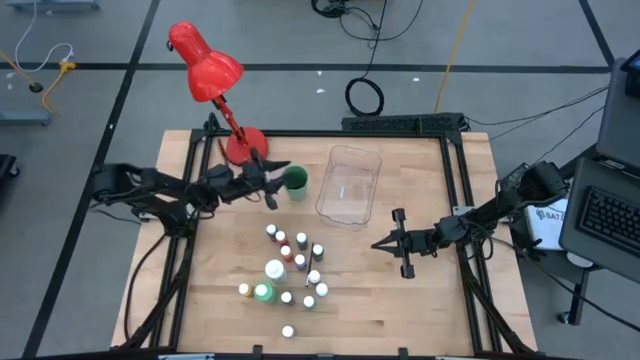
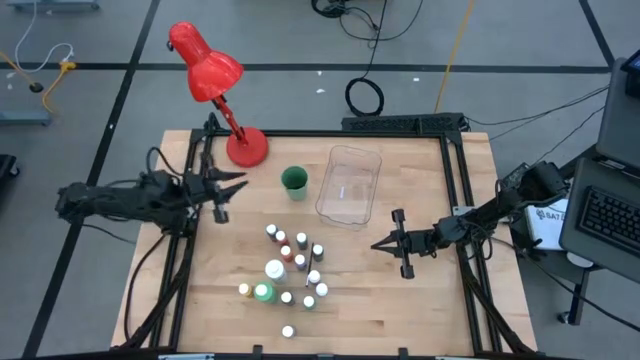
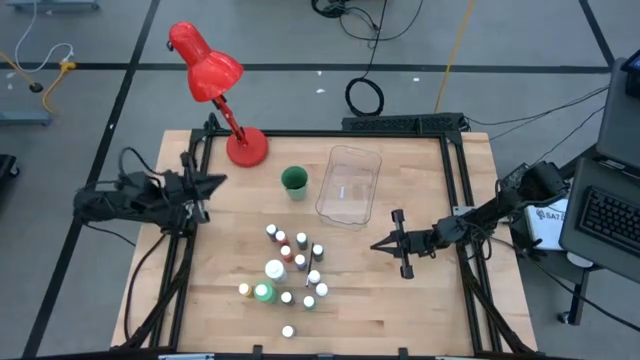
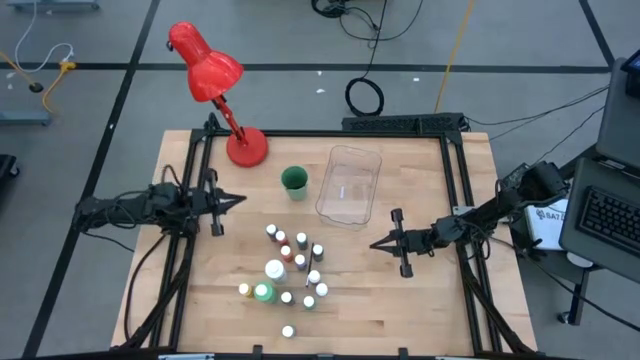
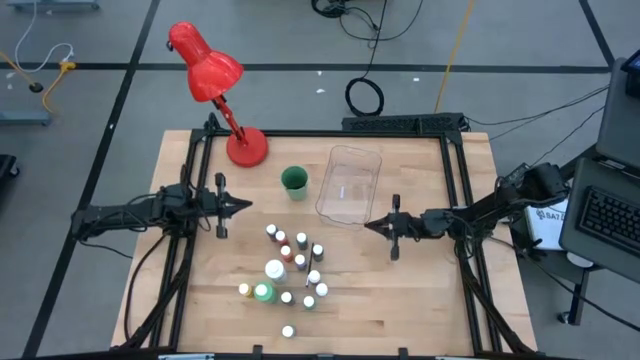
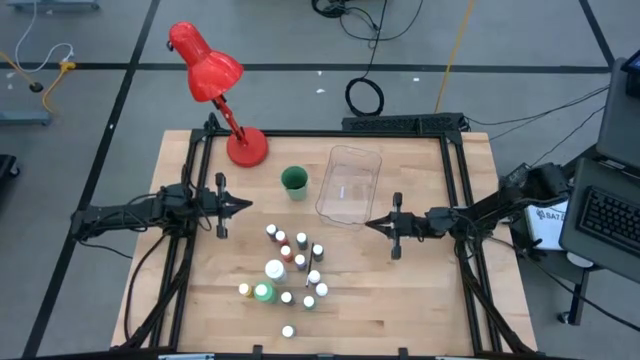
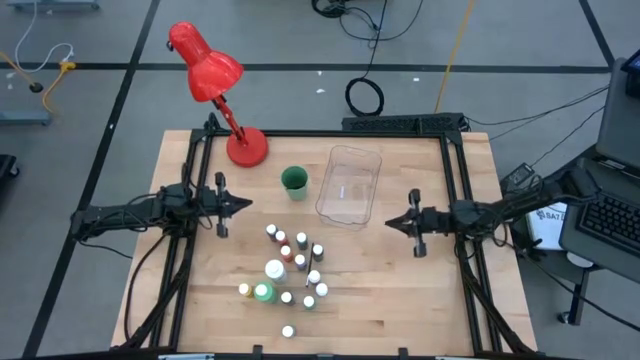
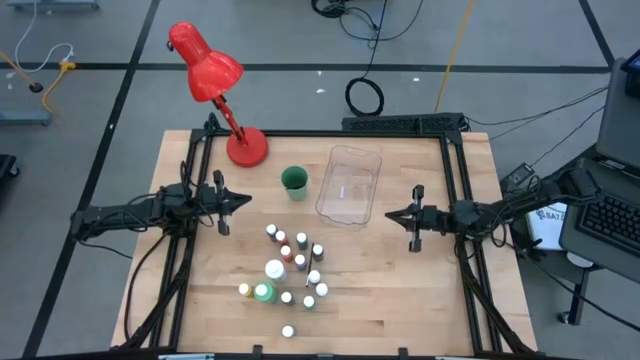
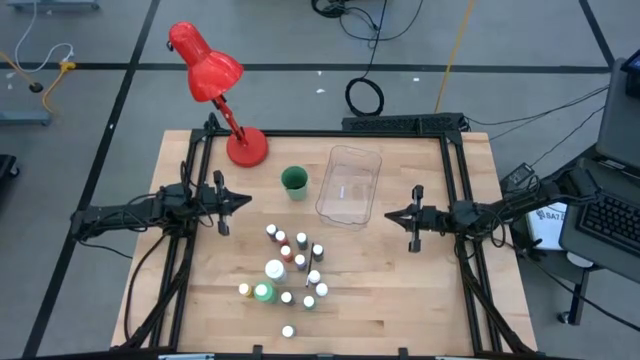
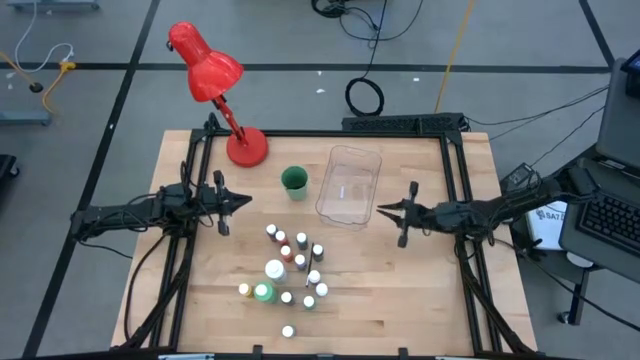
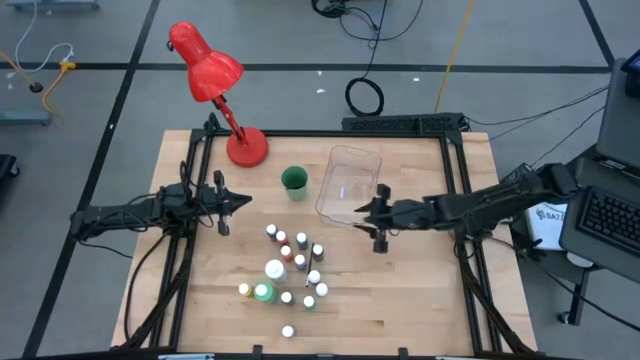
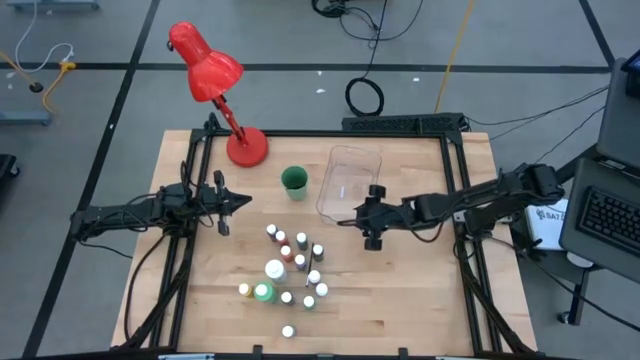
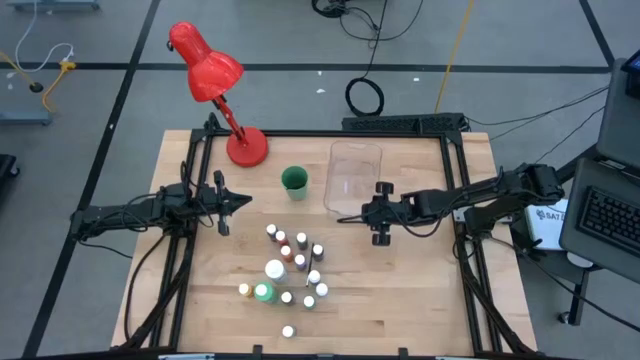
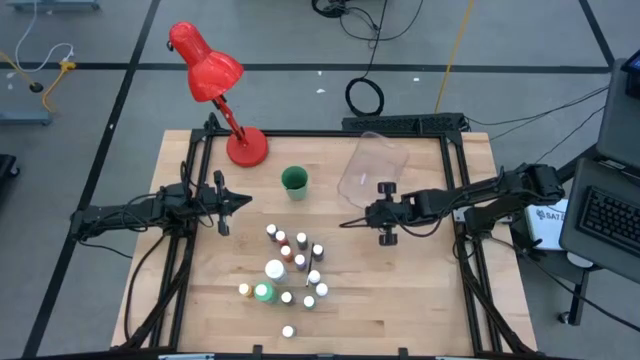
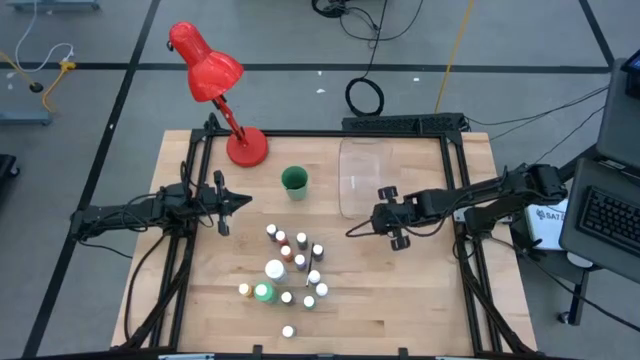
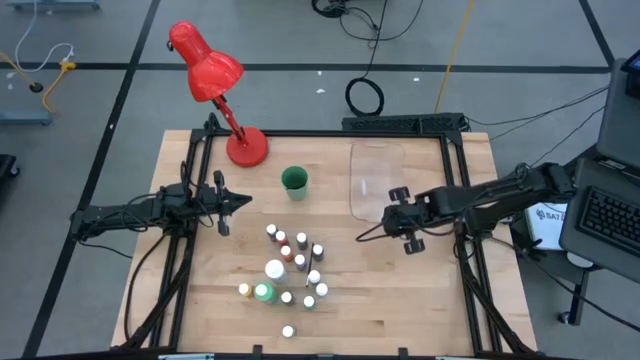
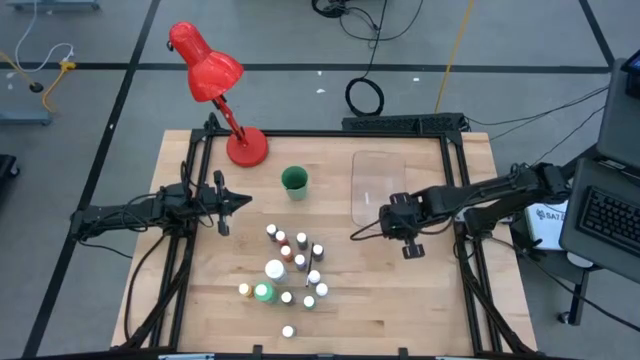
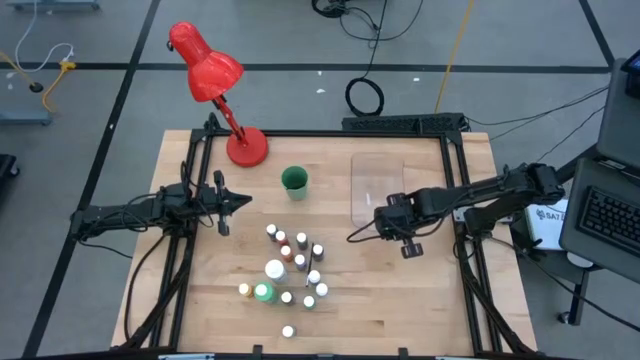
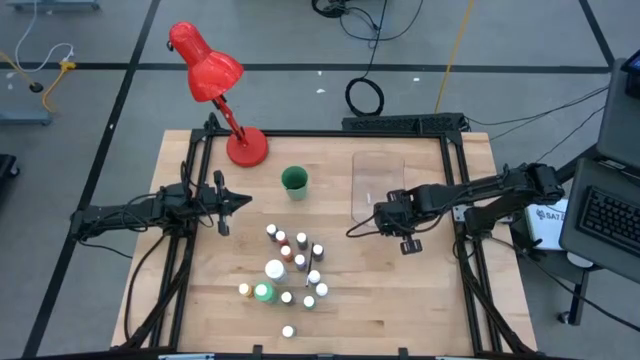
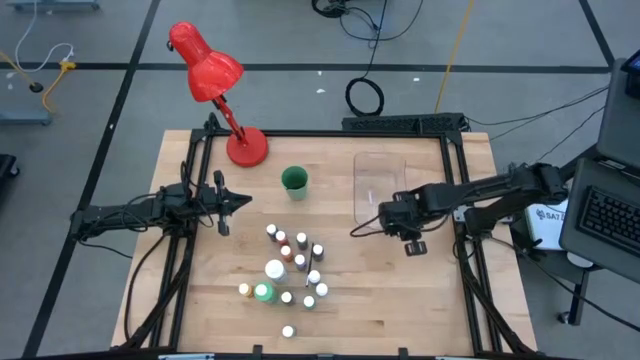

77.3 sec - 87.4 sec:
Task: Pick & Place Paint Supplies
Move the transparent bin to the top right of the table

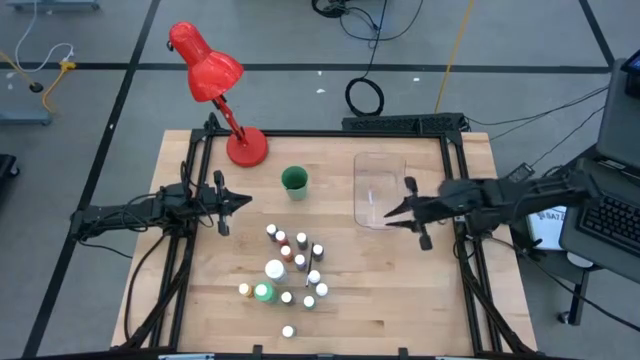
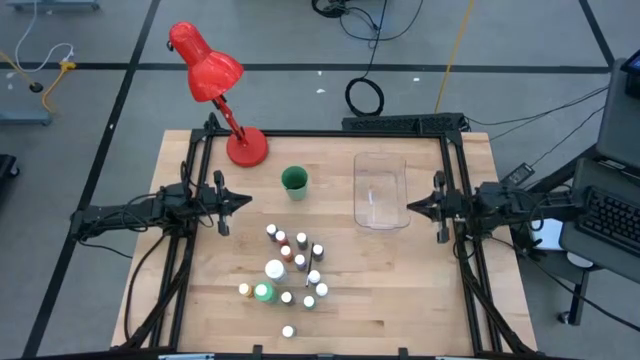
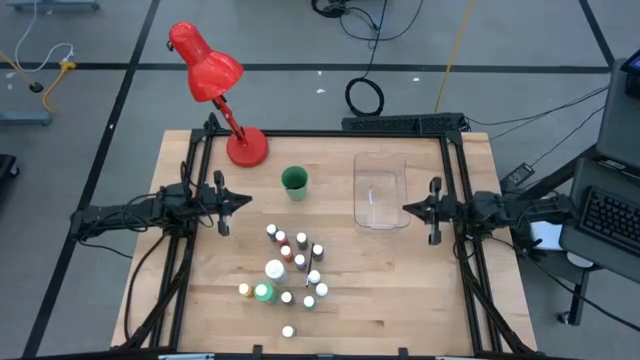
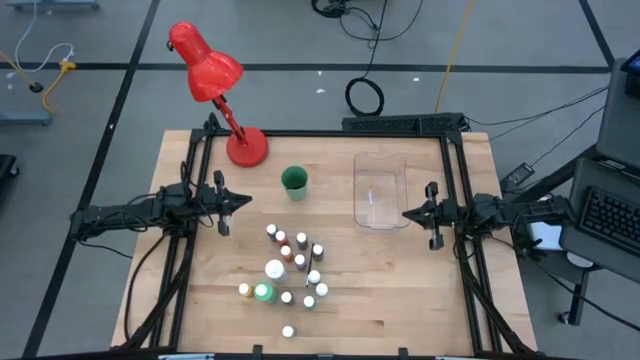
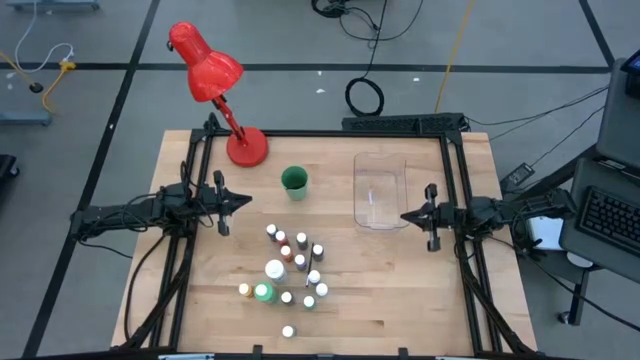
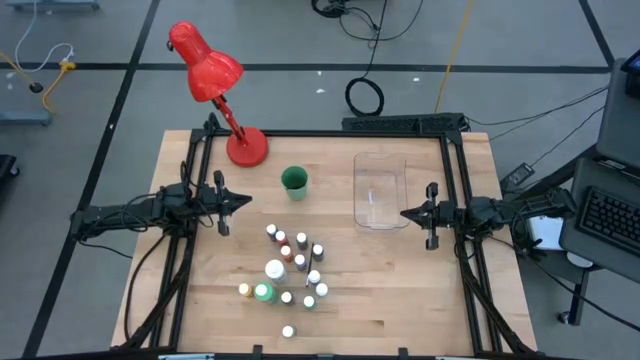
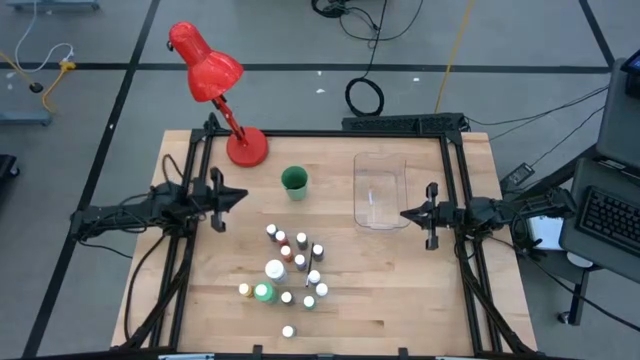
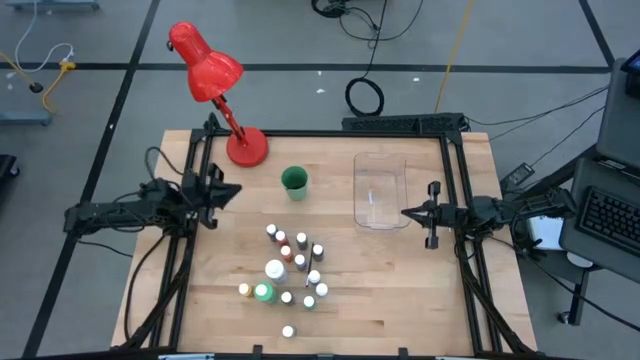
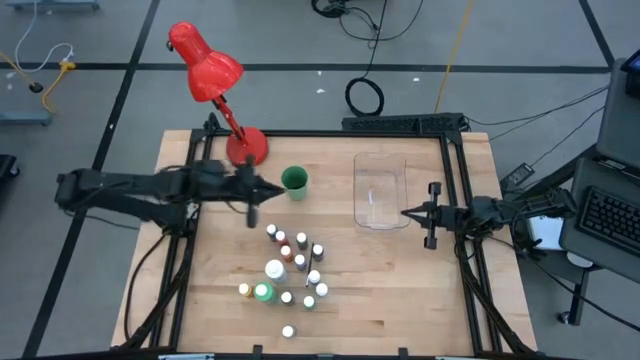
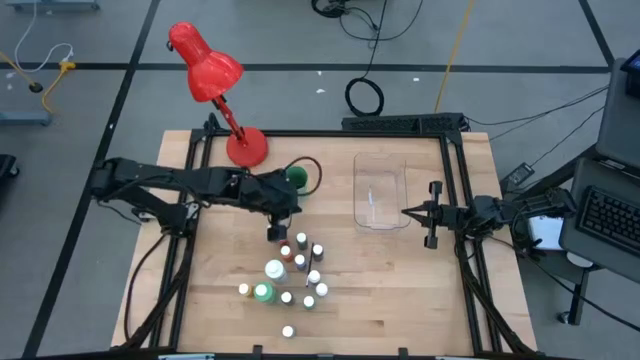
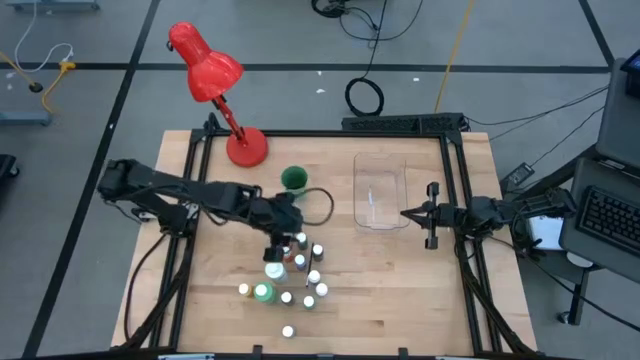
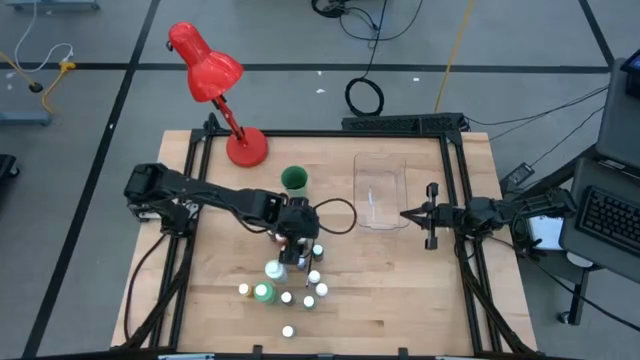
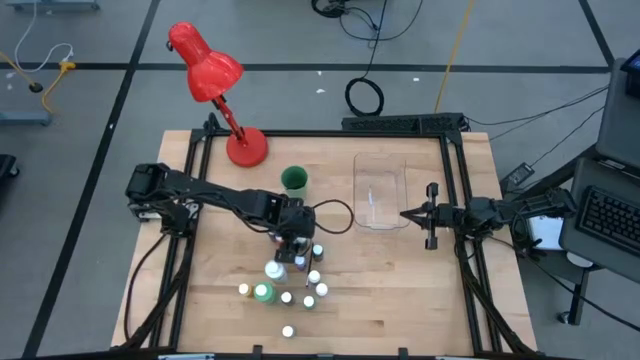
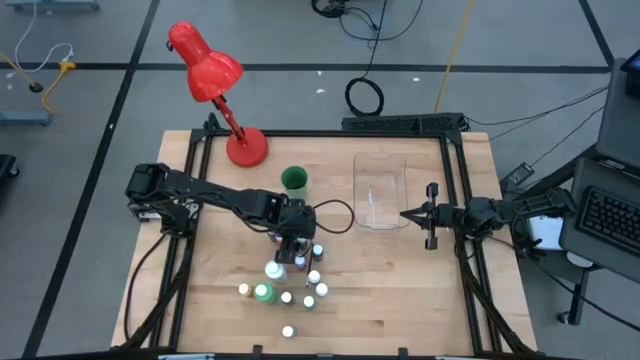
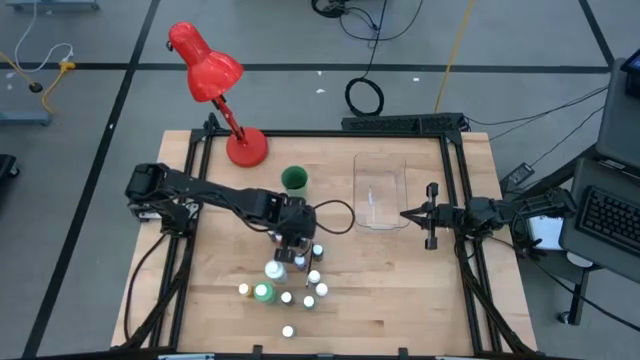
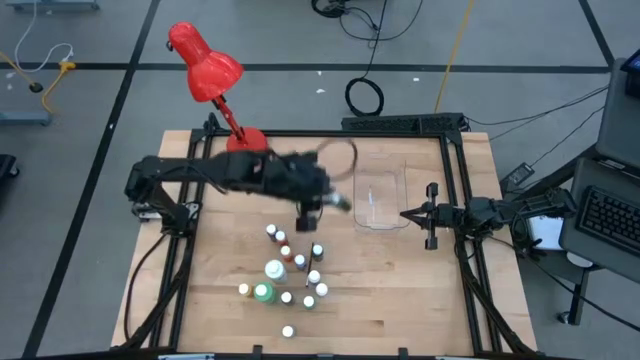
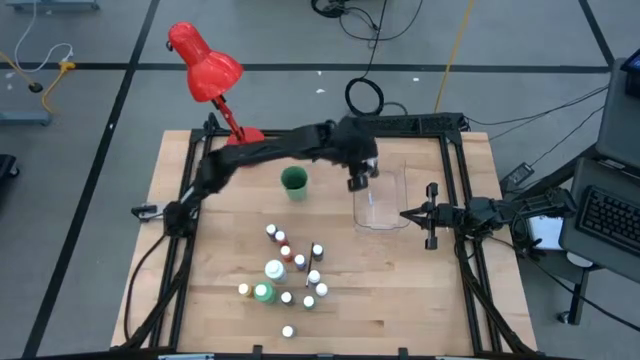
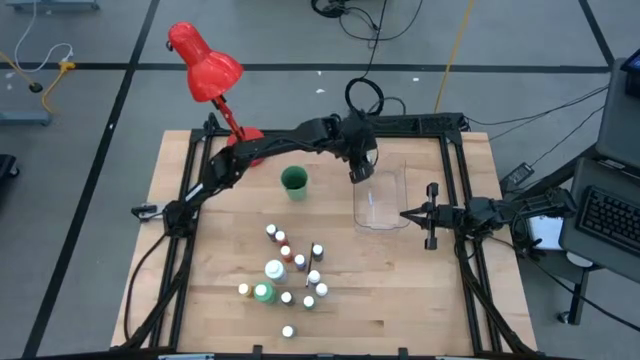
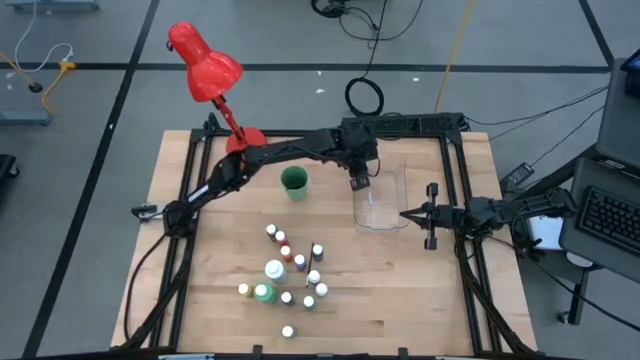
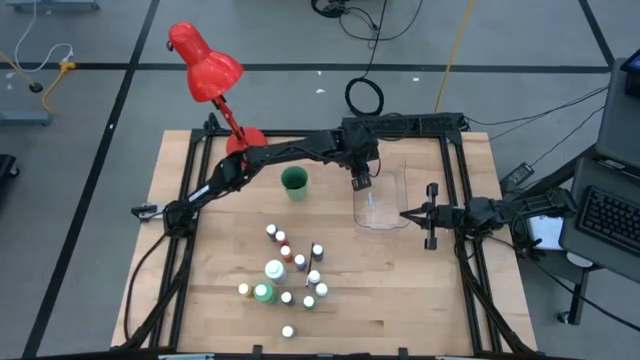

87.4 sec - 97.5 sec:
Put the green paint bottle into the transparent bin

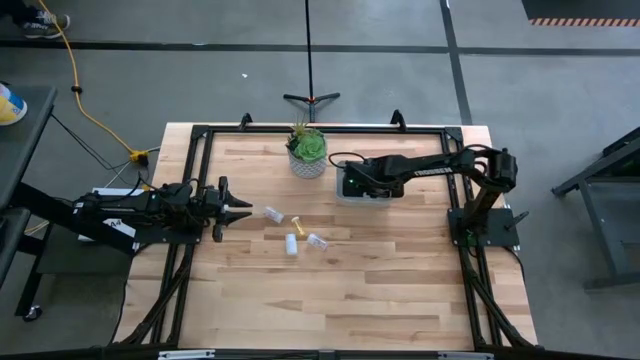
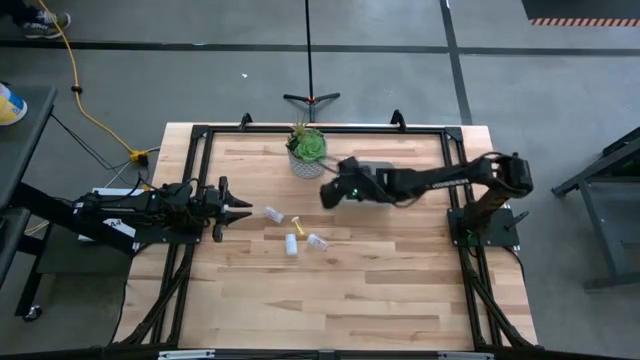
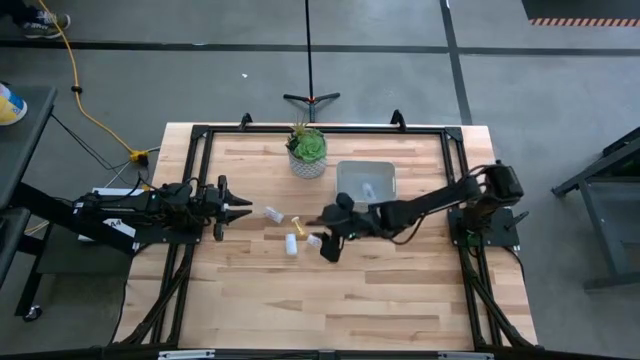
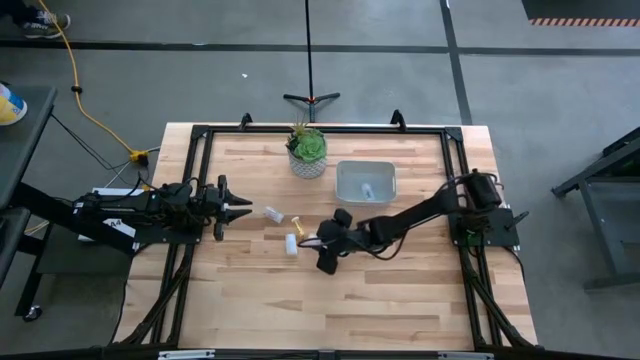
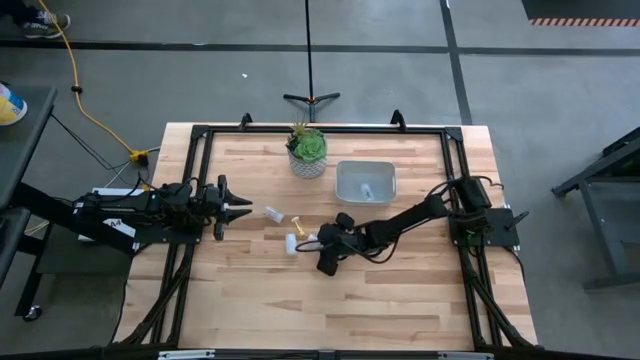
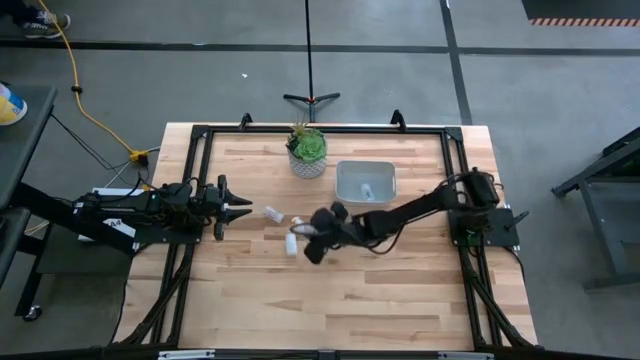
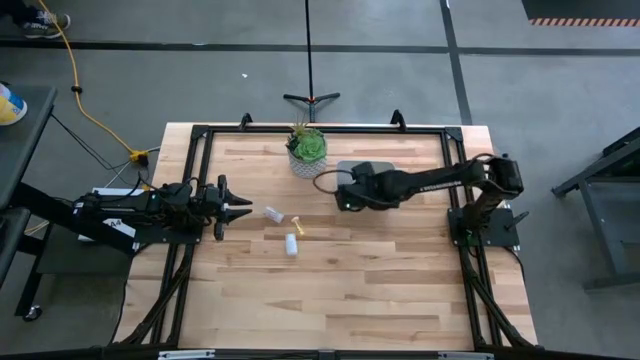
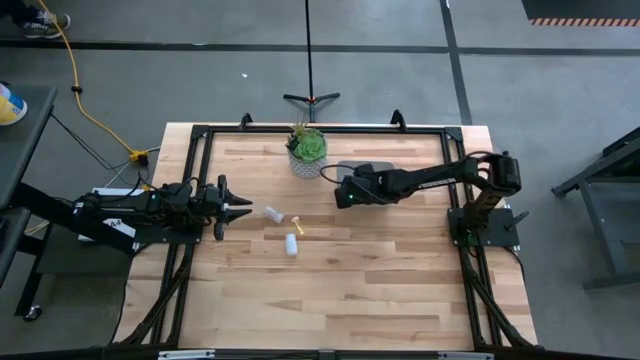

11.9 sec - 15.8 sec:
Task: Pick and place pill bottles into a basket
Put the transparent medicine bottle into the gray bin
